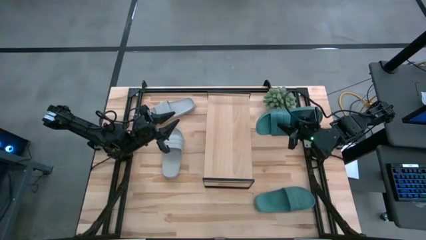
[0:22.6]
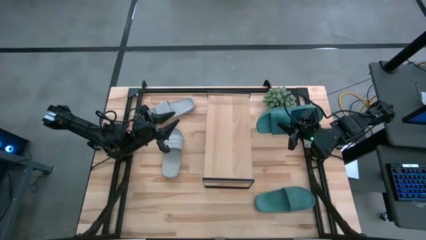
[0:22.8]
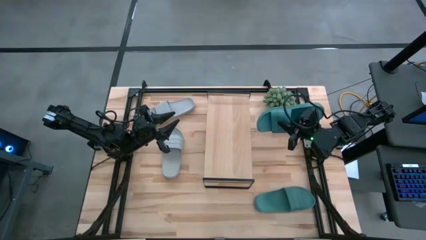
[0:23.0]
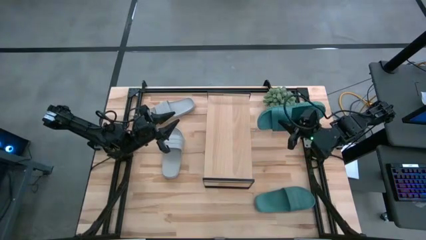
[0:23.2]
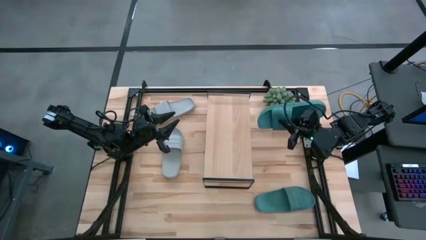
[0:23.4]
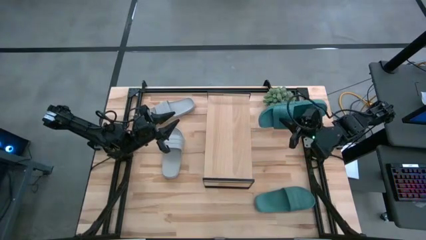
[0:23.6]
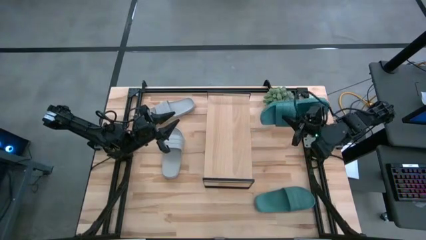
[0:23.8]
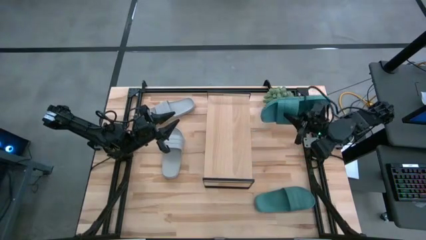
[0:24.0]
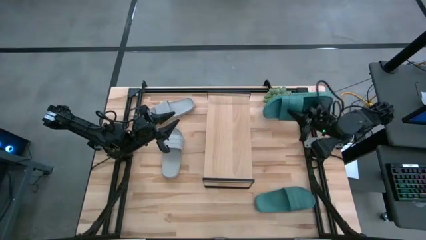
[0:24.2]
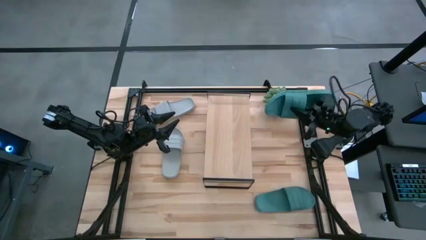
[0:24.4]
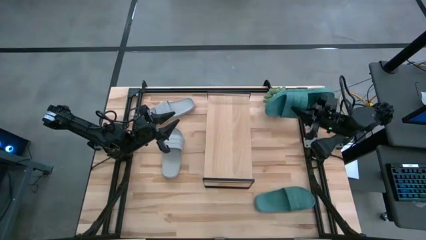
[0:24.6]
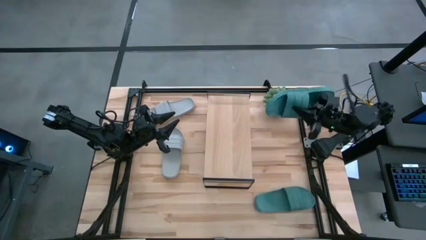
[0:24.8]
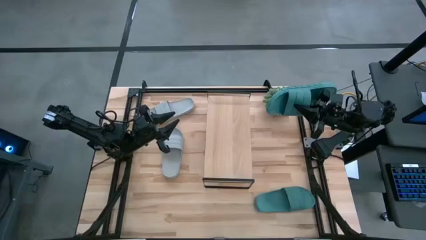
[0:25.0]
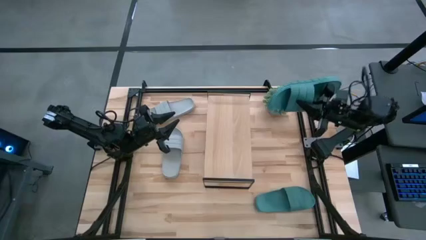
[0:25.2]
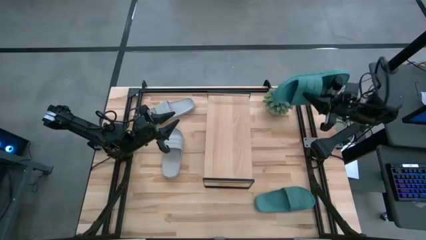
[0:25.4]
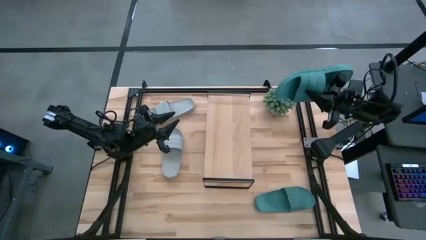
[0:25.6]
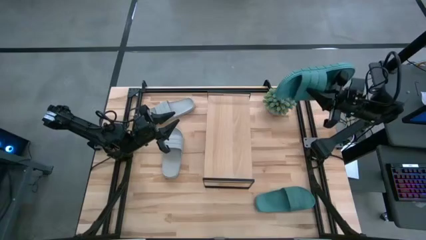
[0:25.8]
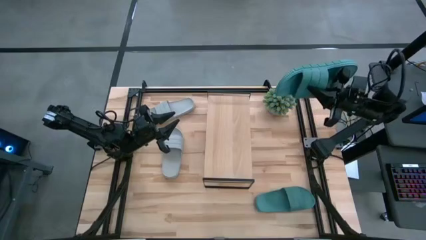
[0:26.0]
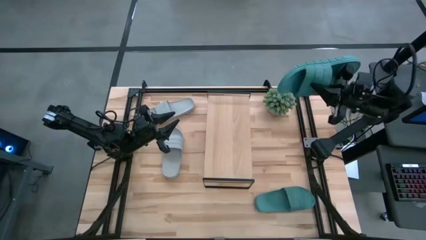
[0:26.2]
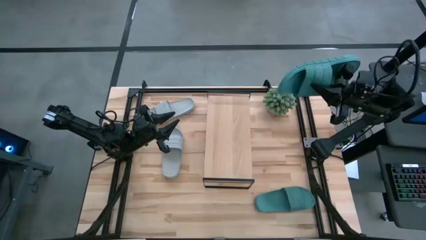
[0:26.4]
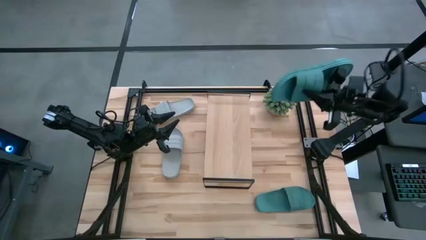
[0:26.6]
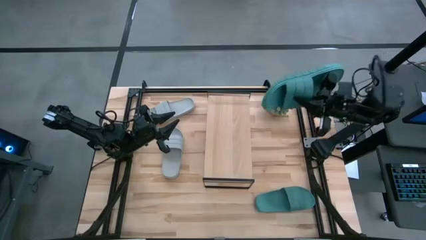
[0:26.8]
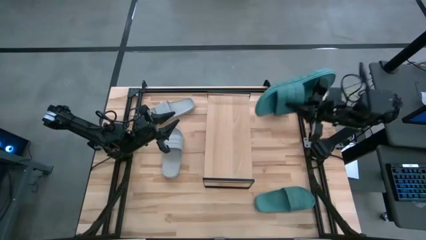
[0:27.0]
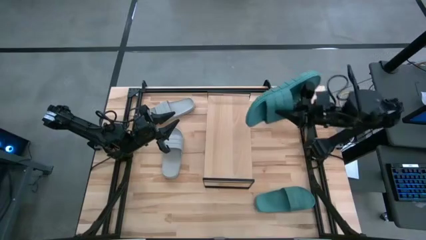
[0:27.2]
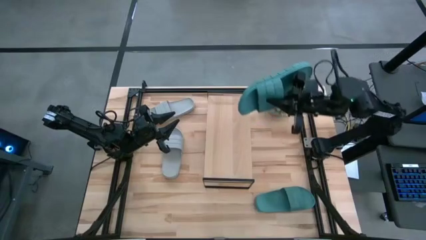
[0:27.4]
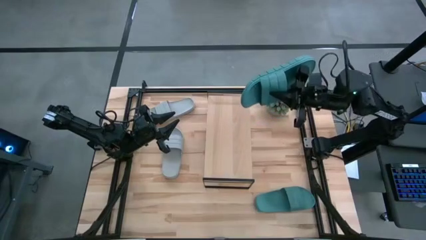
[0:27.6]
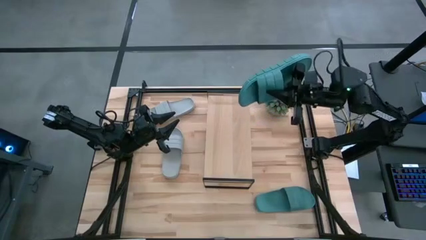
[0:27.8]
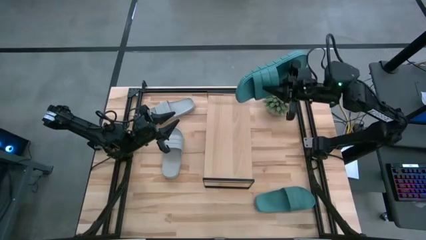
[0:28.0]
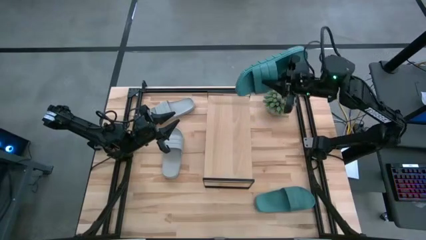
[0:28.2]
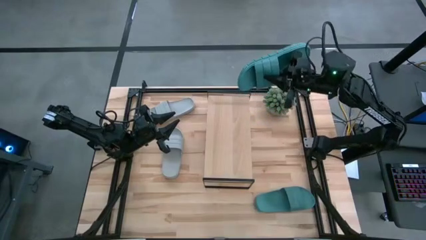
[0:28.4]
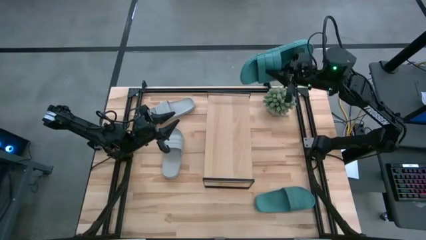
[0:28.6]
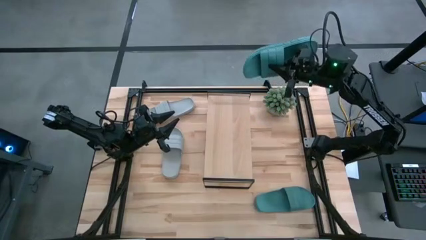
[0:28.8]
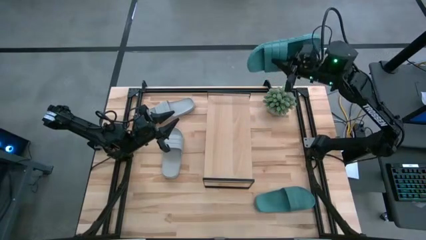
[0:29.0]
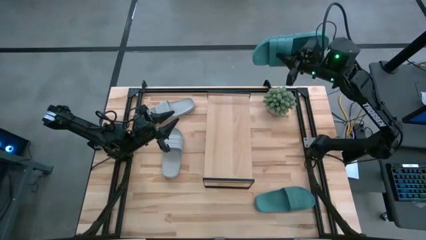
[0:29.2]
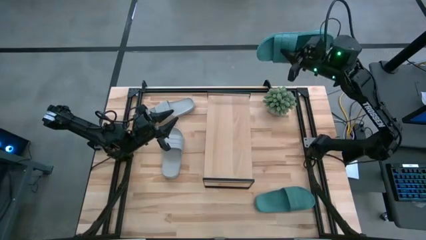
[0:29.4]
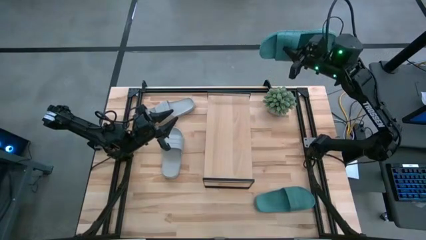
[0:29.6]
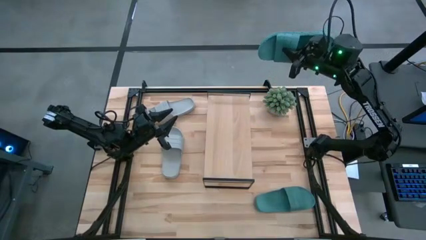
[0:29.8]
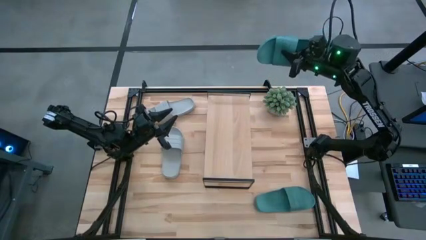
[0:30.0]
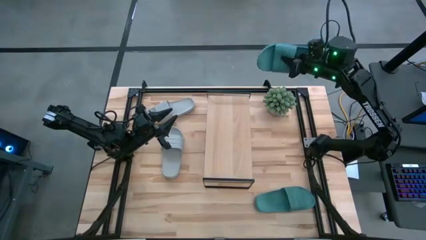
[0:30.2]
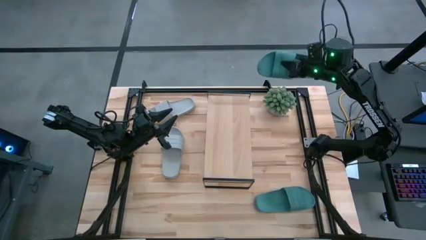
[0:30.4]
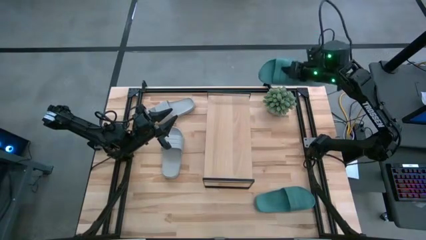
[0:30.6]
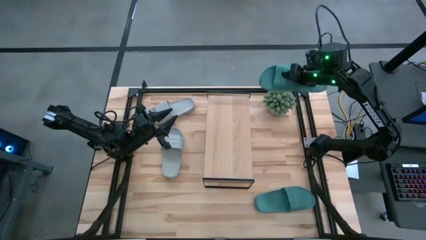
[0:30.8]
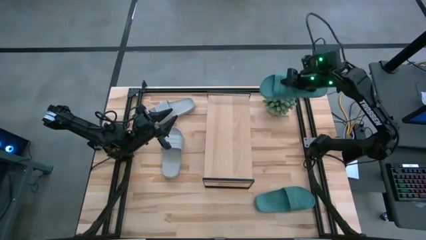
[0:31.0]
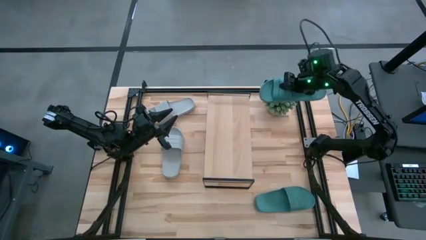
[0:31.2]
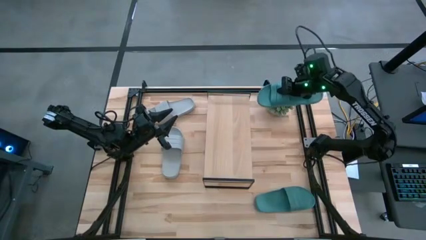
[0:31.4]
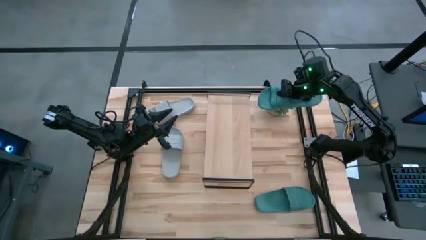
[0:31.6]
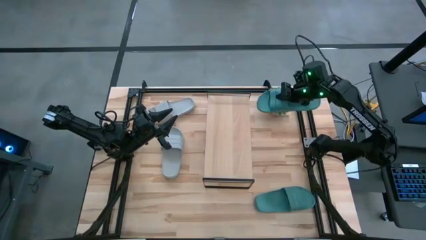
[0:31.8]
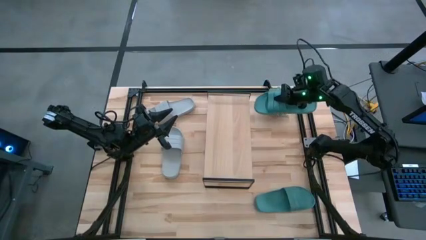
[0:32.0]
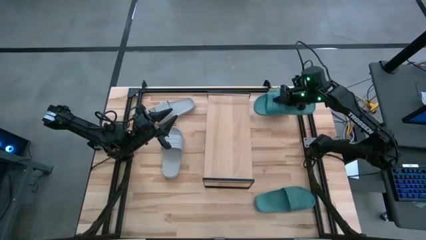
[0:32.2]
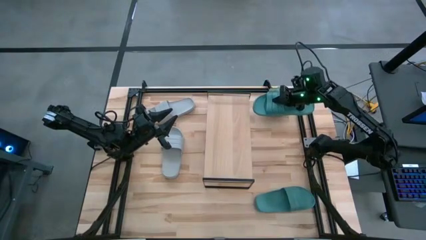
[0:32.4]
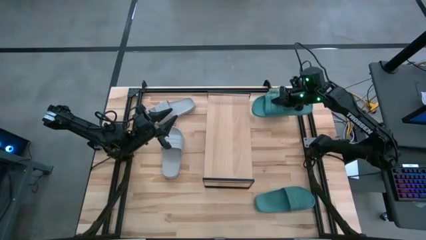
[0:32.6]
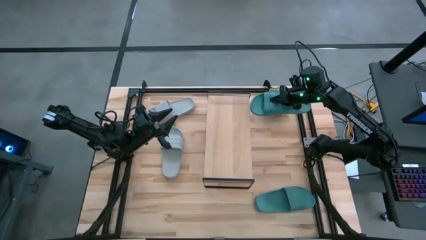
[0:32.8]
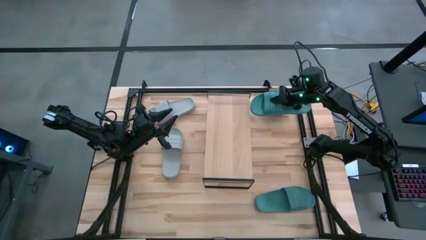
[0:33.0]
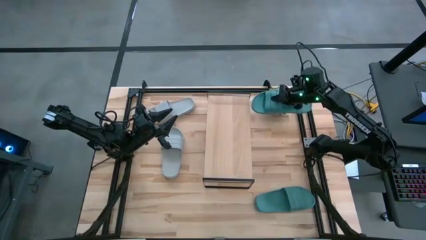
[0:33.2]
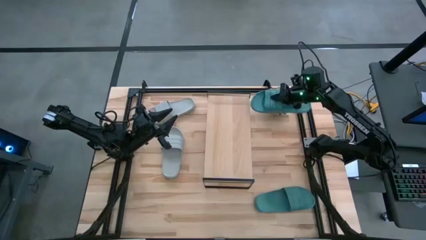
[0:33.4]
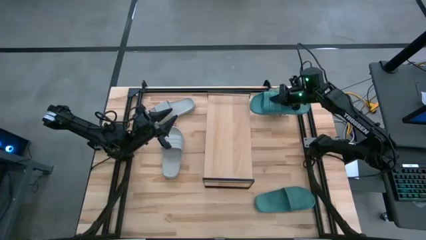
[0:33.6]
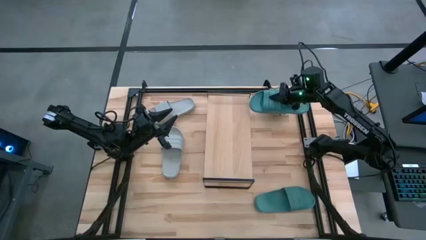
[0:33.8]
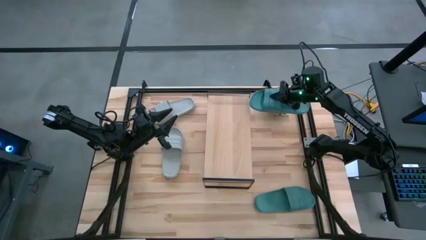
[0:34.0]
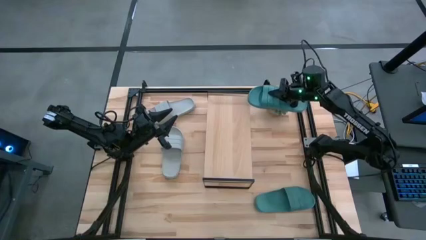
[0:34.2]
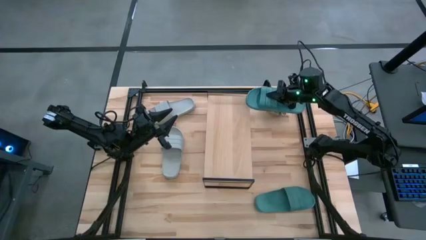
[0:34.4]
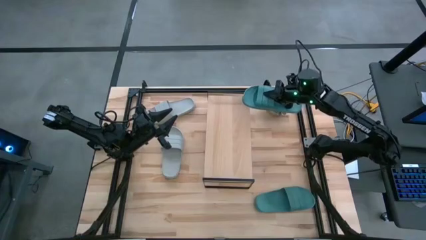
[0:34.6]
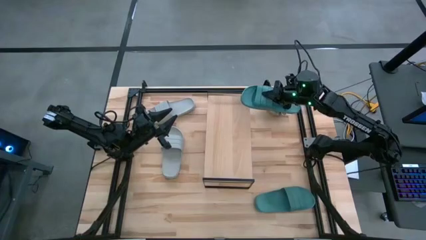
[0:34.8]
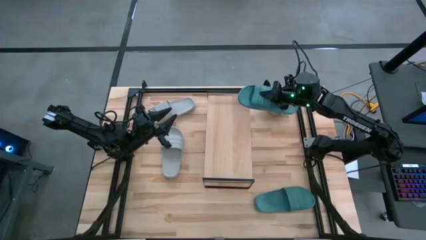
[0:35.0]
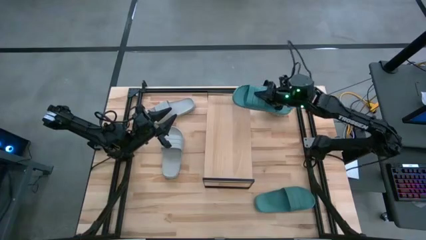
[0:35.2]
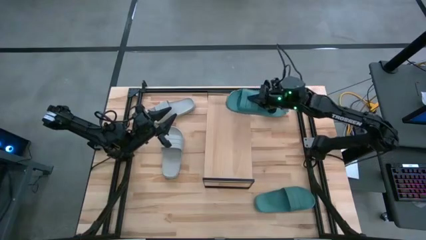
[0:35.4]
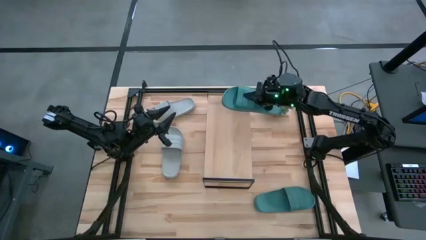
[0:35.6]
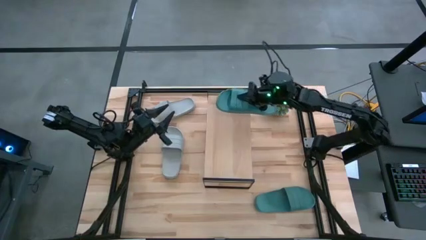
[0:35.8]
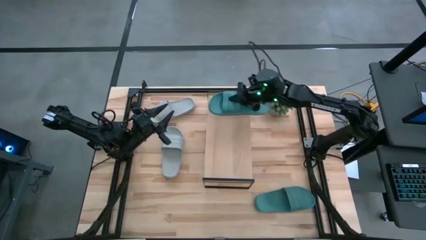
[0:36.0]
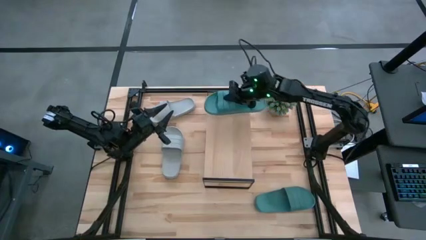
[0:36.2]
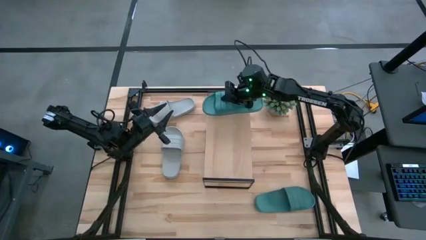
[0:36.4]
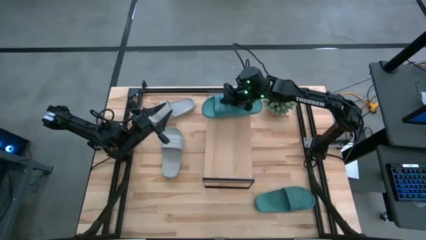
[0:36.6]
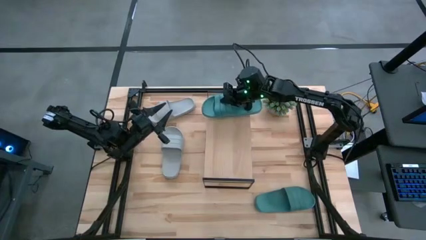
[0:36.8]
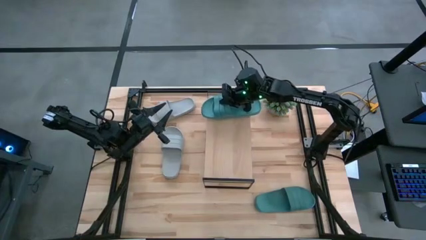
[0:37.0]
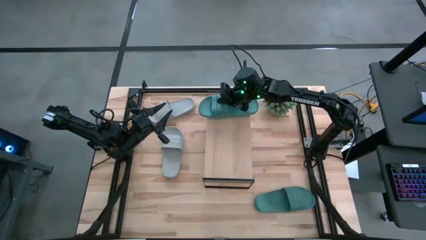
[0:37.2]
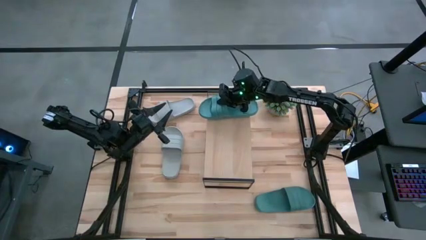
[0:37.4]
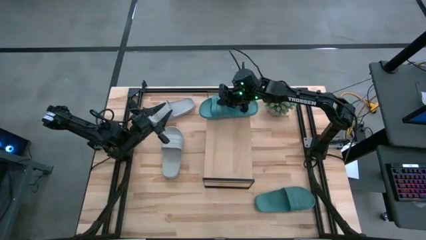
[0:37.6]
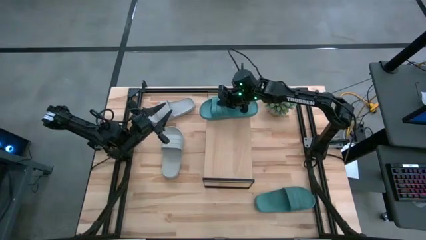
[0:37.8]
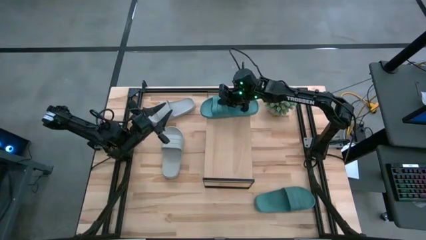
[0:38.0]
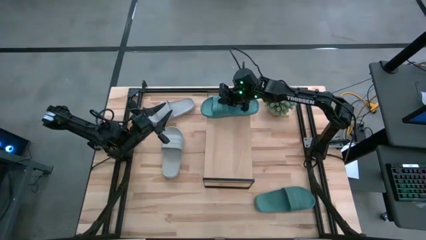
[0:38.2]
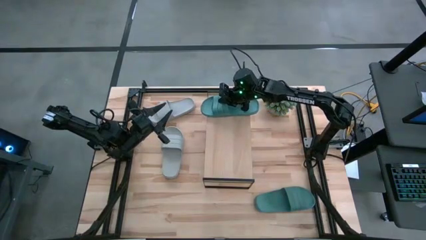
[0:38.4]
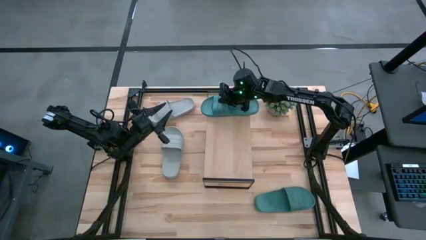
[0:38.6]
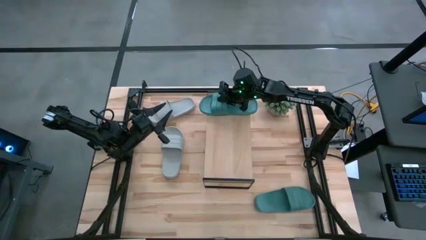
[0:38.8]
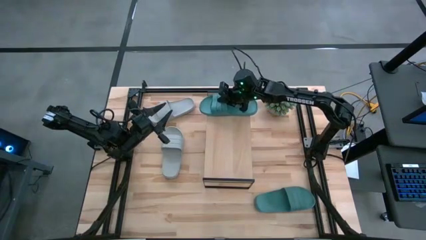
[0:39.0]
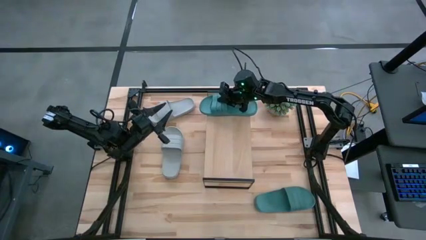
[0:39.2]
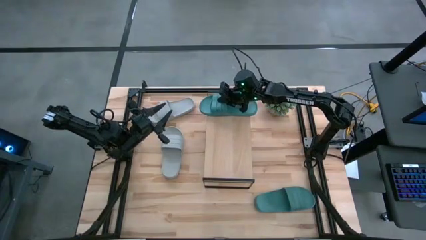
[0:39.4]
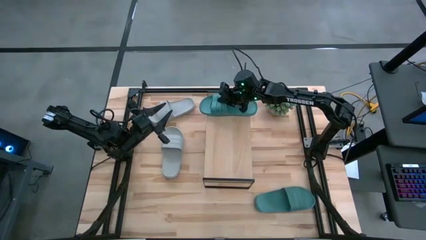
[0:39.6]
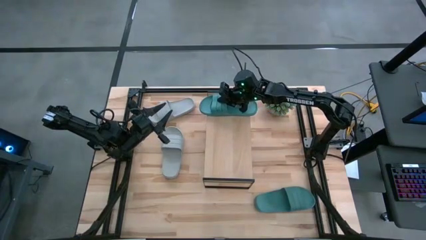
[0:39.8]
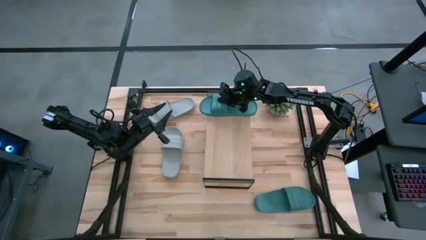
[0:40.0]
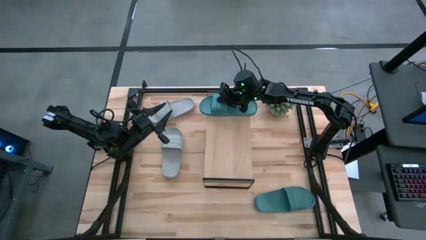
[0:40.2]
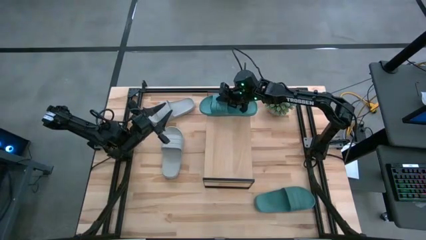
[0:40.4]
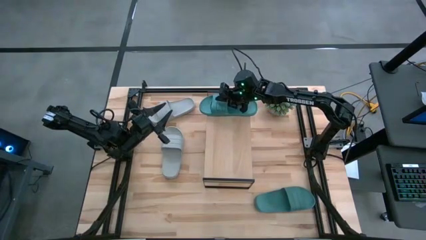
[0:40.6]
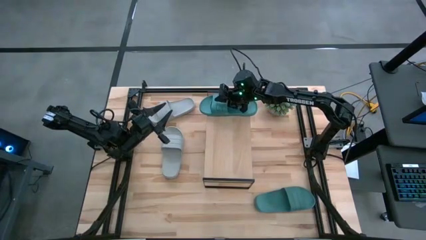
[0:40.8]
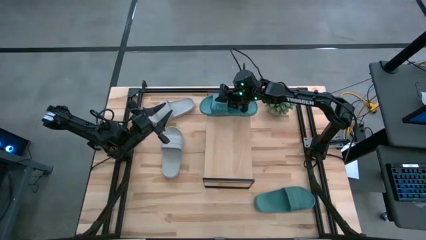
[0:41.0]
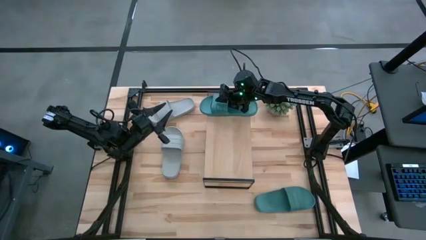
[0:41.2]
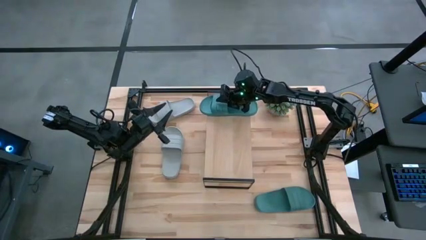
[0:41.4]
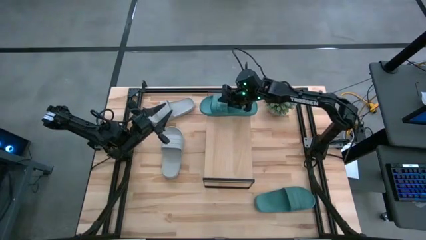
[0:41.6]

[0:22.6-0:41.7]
Task: Pick and place slides into the shelf
Put the top green slide on the shelf
